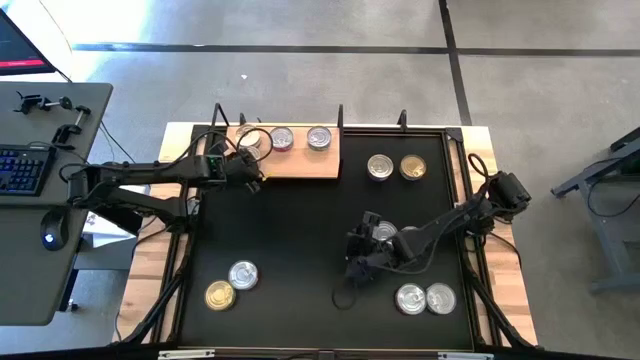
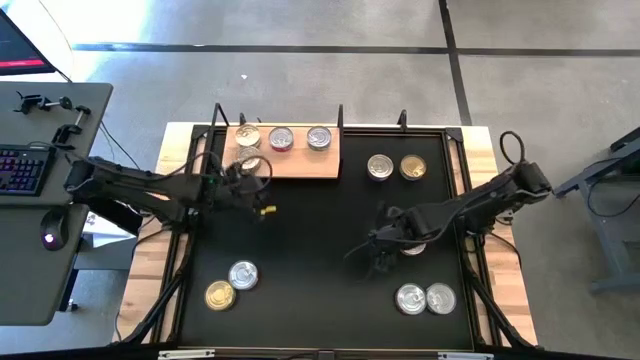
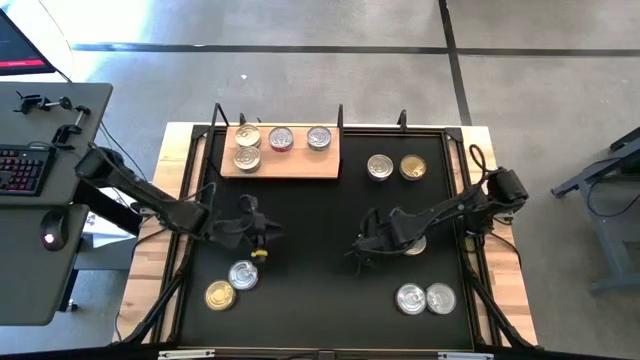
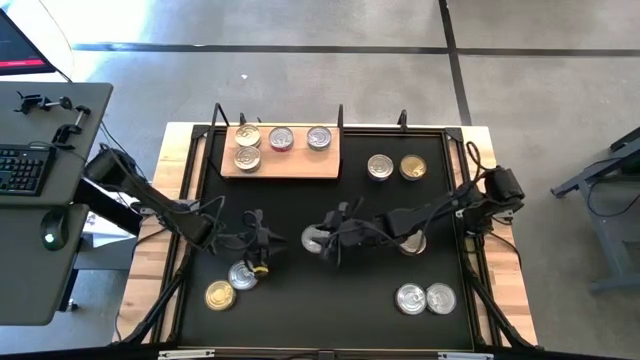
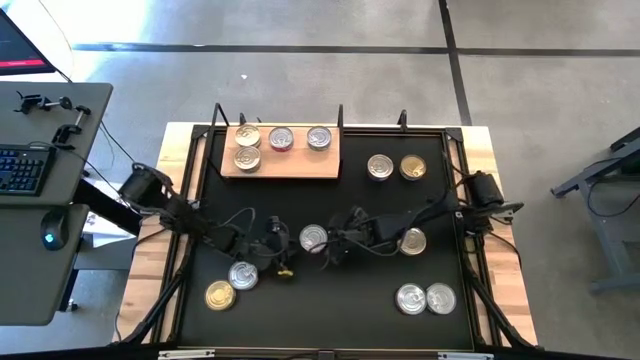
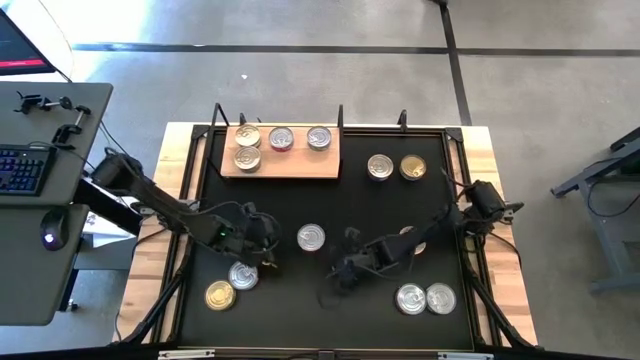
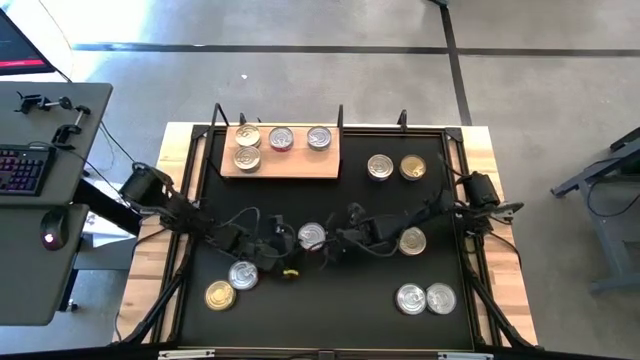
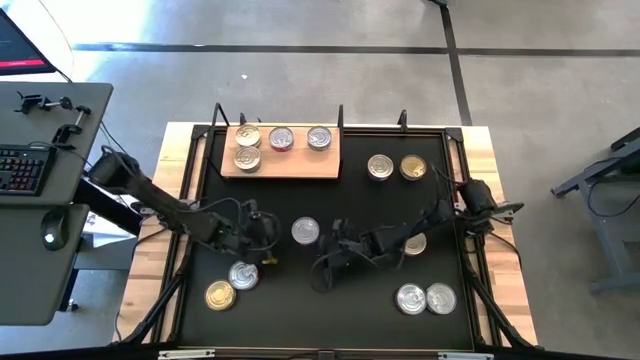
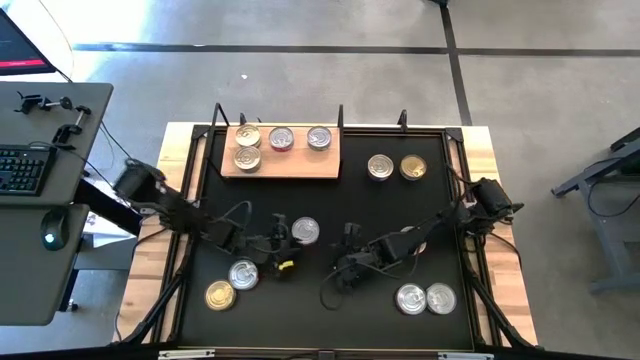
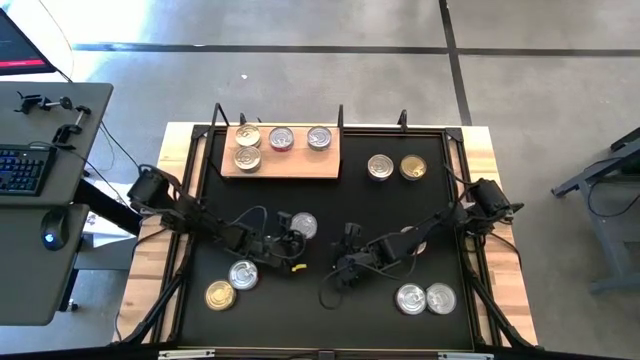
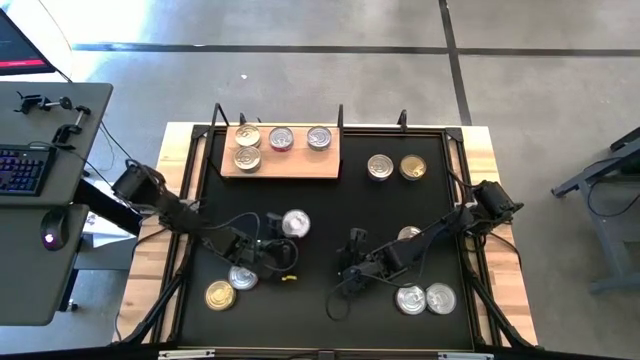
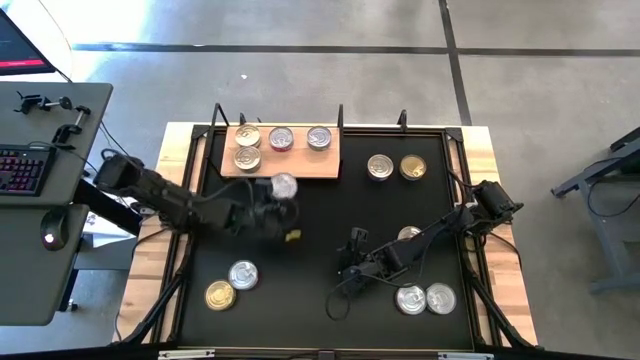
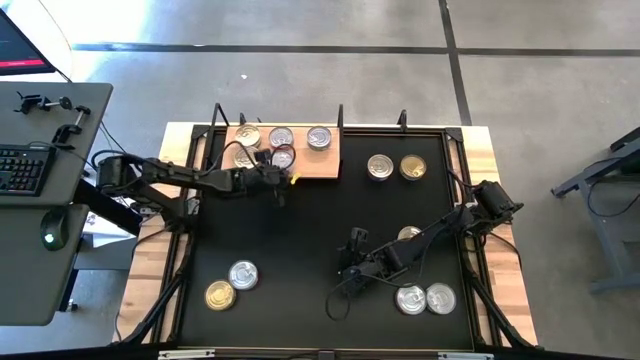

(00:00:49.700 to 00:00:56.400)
Task: Stack canned seafood by type on shelf
Put the red tuna can on the shelf

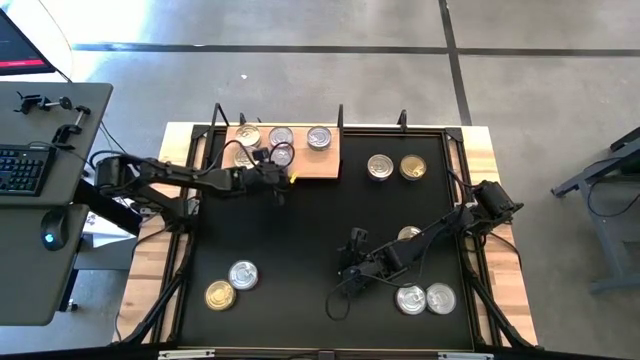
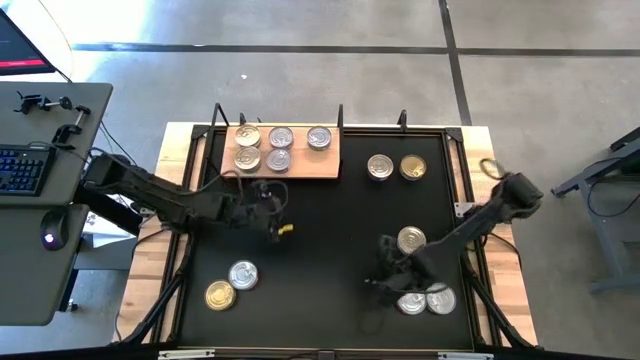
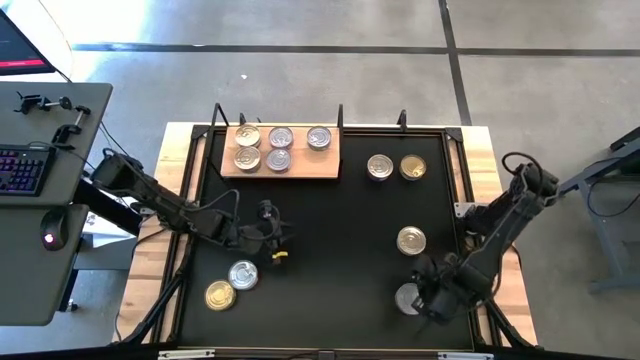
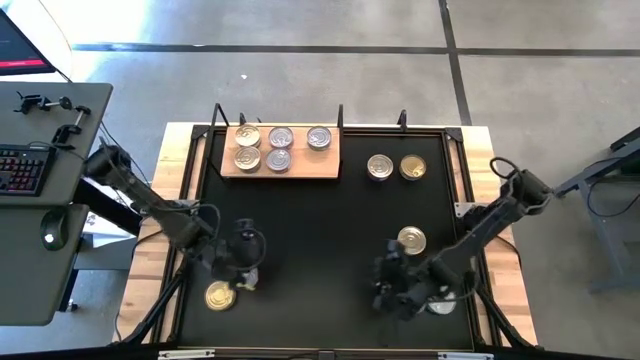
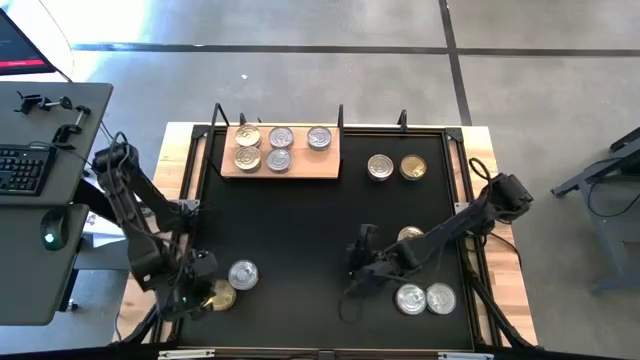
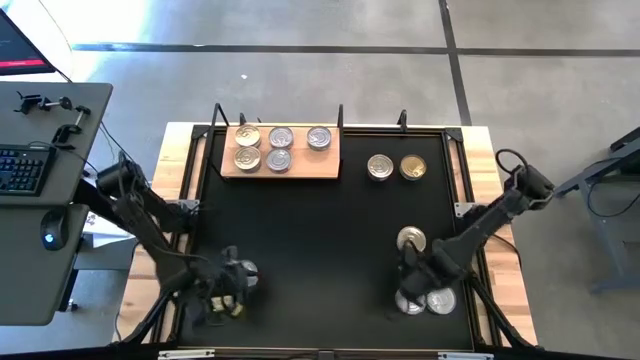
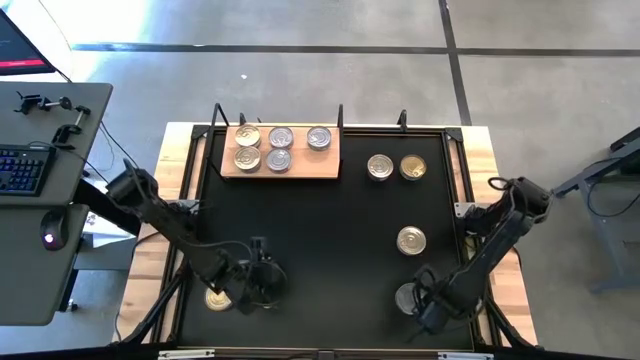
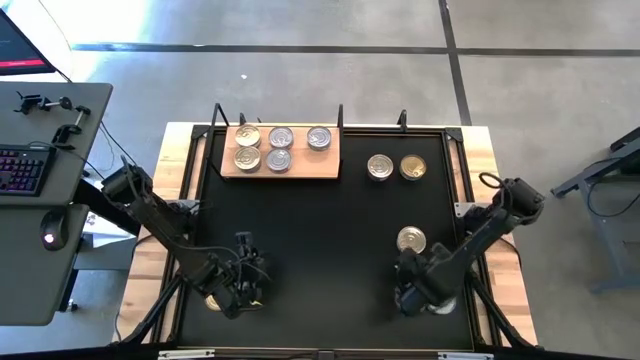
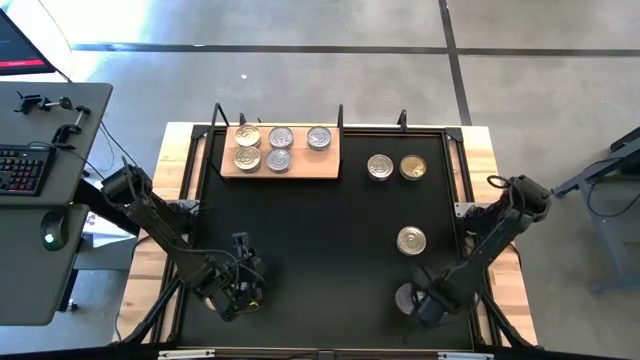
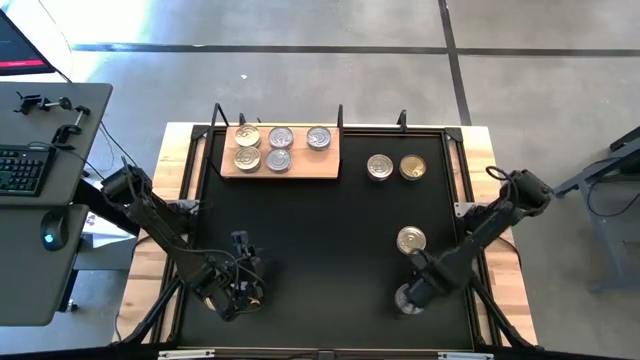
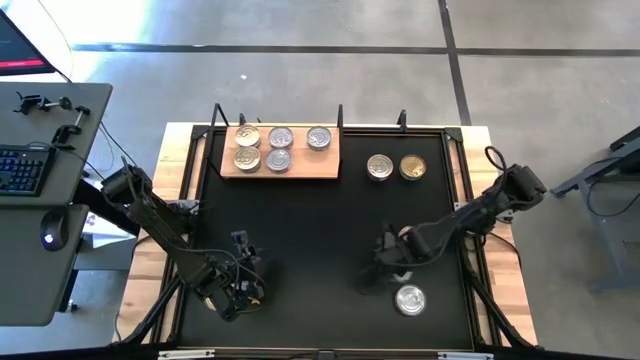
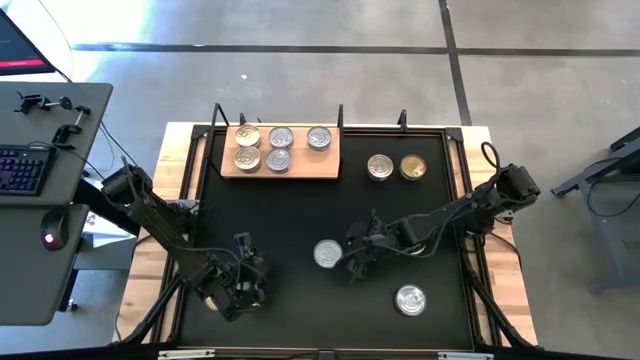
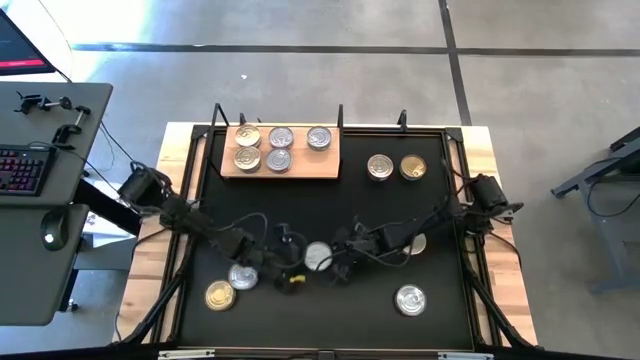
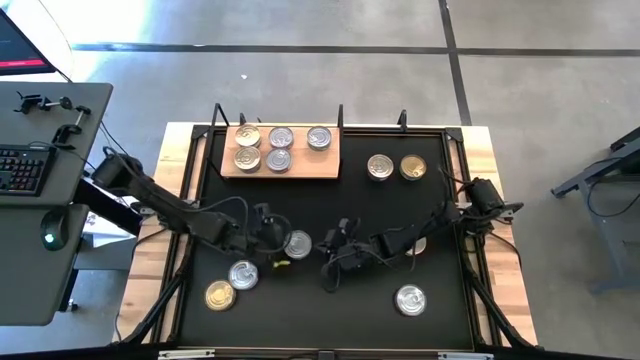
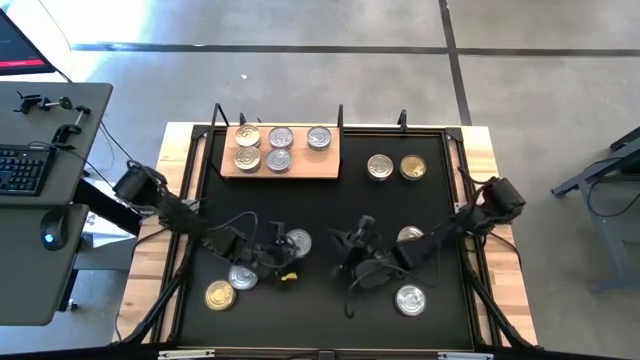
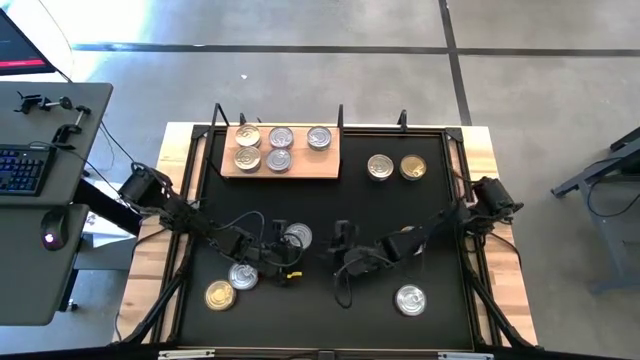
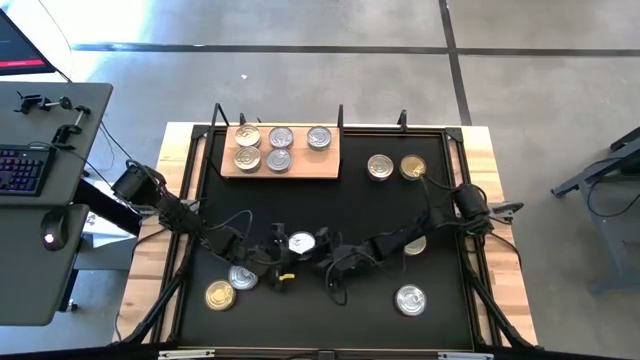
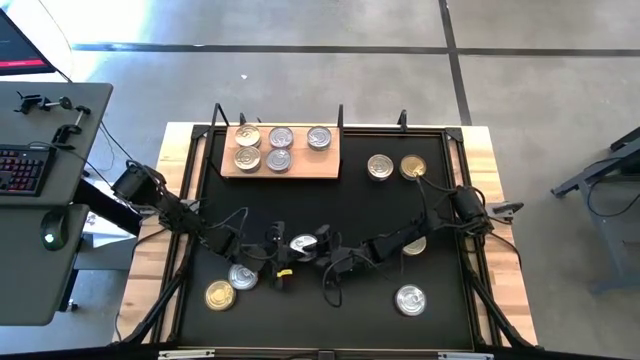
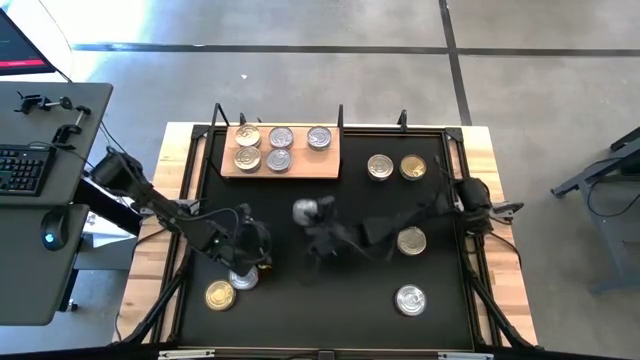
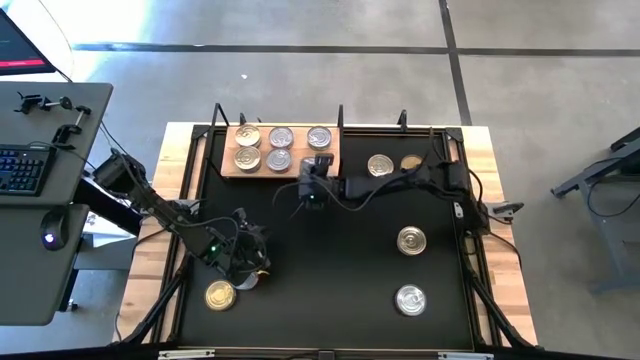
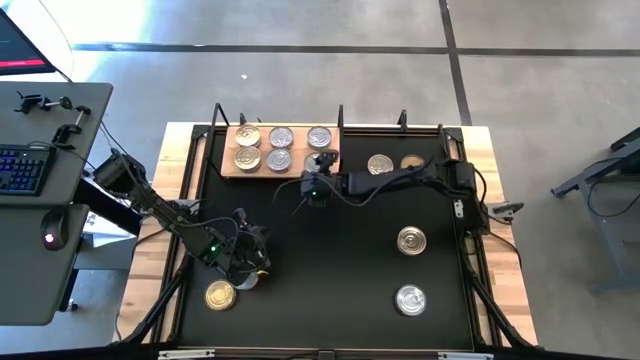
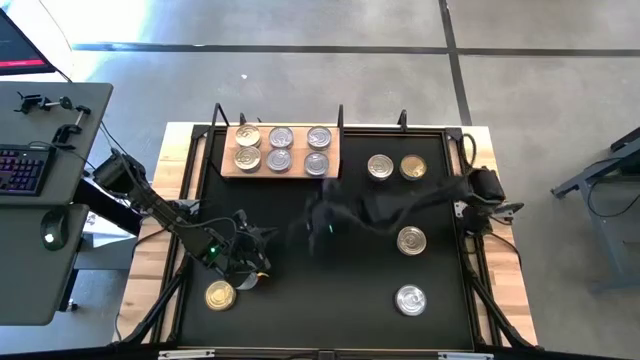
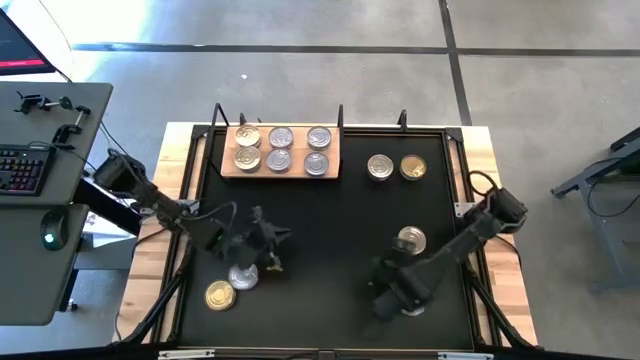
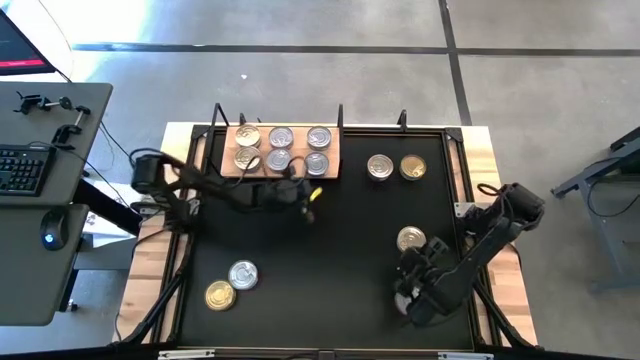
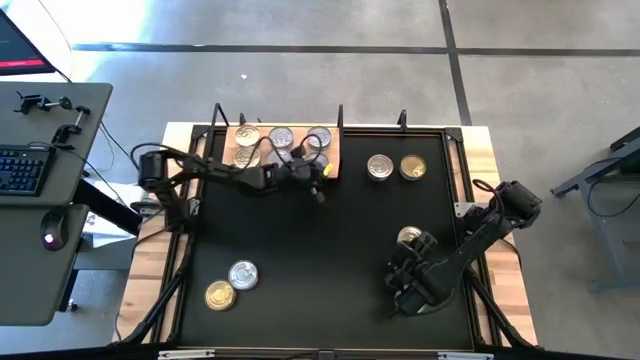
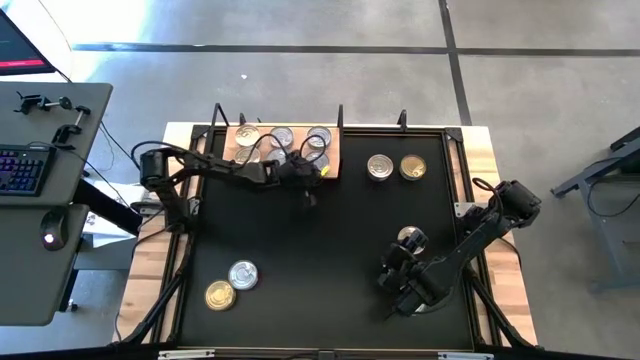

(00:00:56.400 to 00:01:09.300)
Put the green tuna can on the shelf

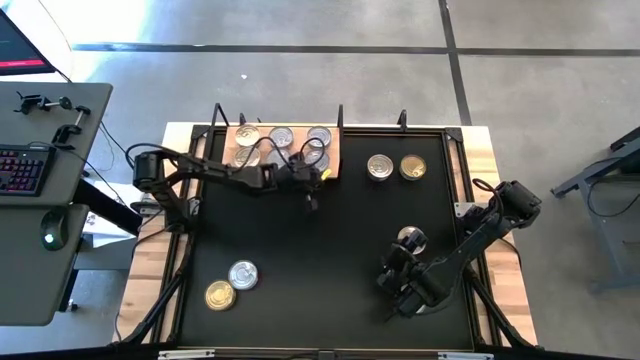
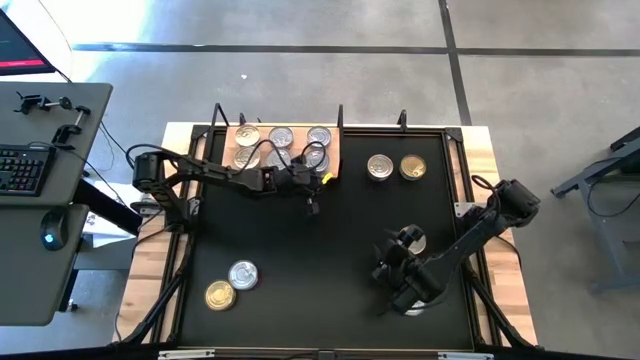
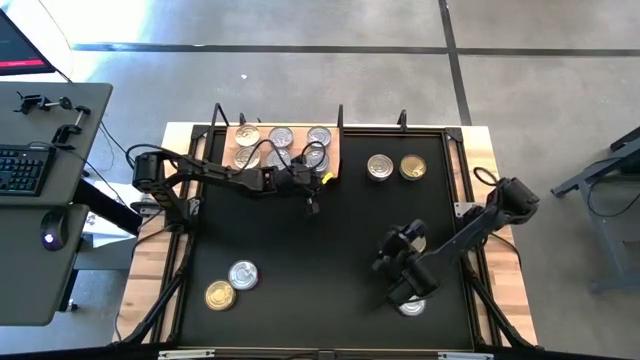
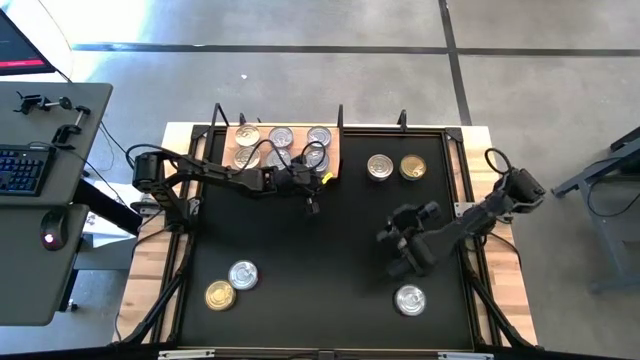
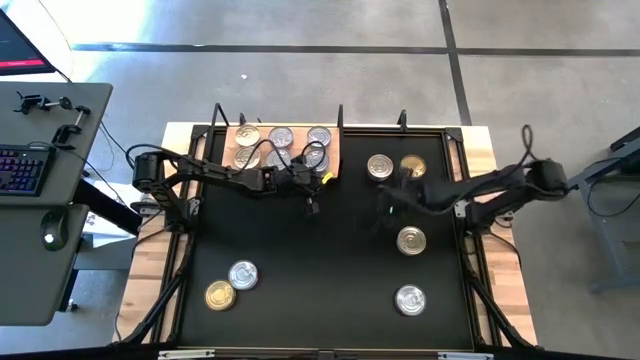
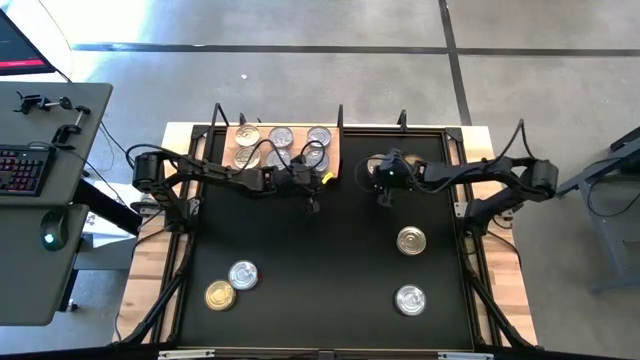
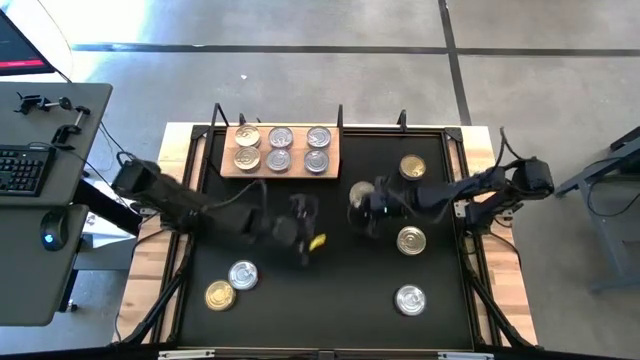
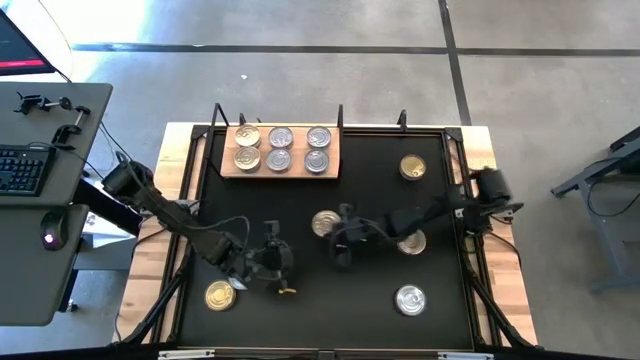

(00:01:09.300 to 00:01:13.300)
Stack the blue tuna can on top of the blue tuna can on the shelf
